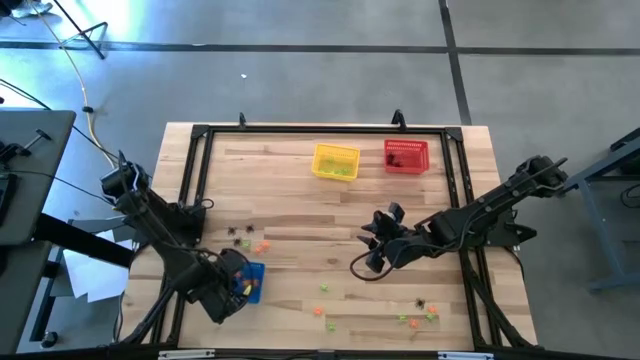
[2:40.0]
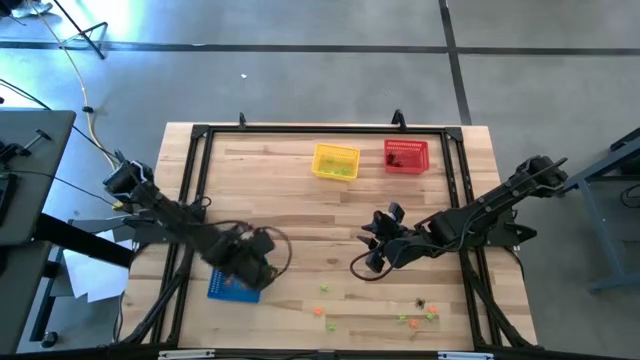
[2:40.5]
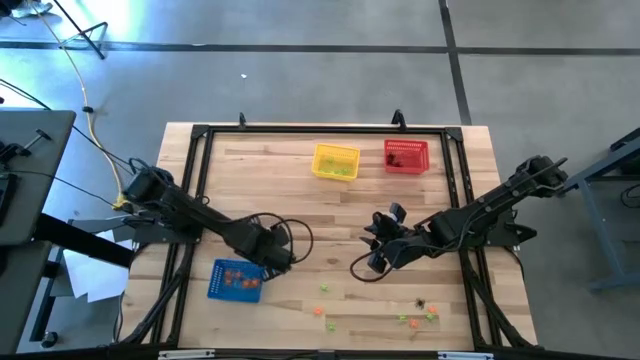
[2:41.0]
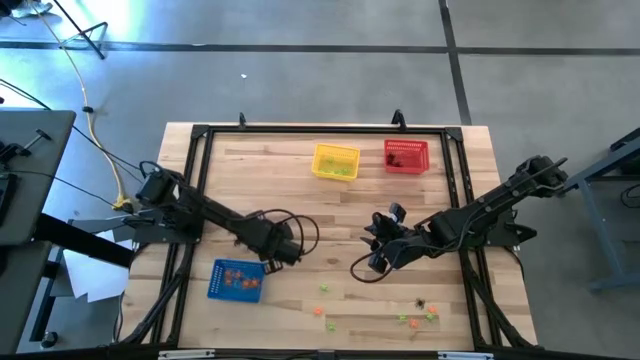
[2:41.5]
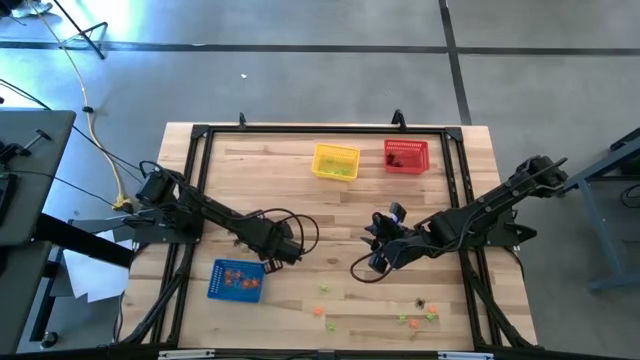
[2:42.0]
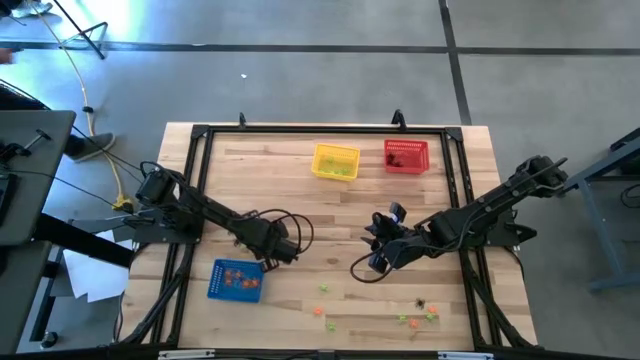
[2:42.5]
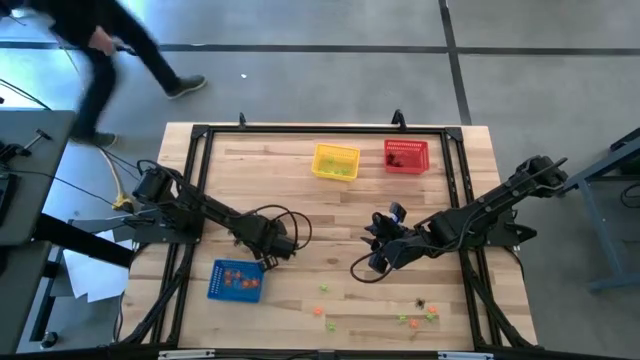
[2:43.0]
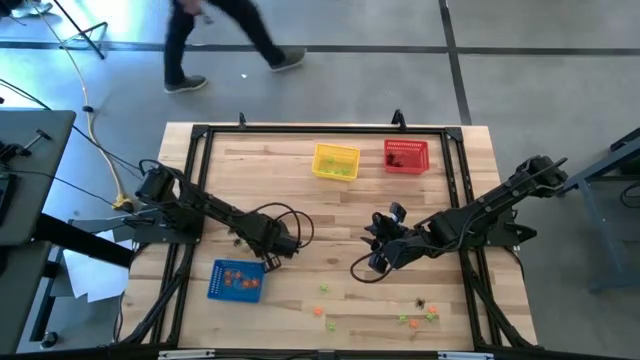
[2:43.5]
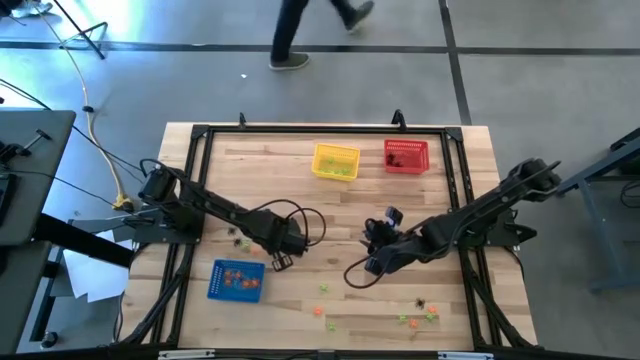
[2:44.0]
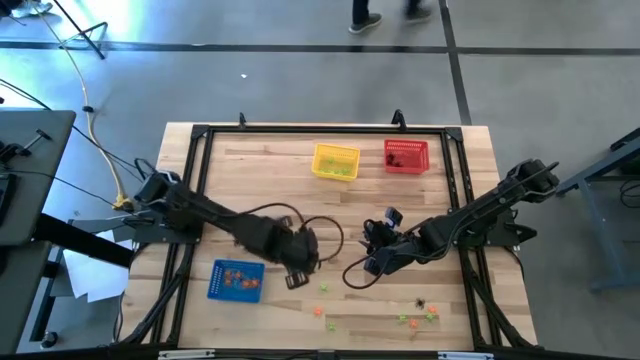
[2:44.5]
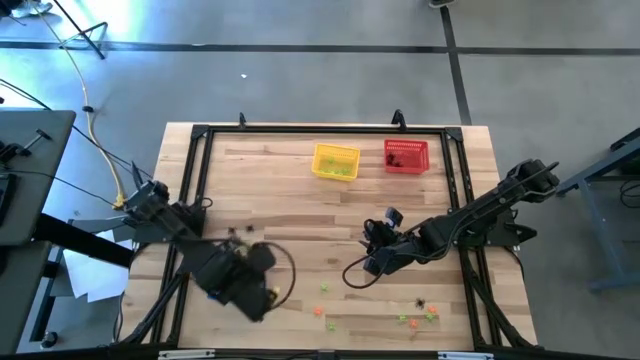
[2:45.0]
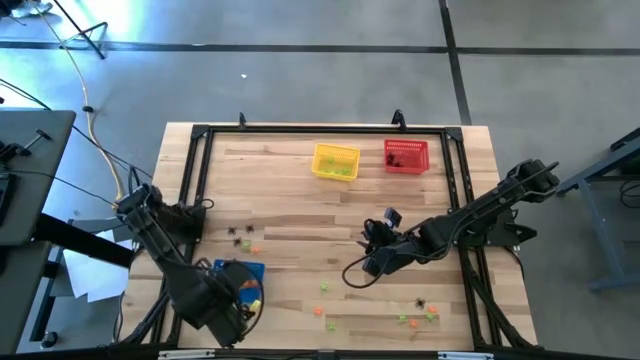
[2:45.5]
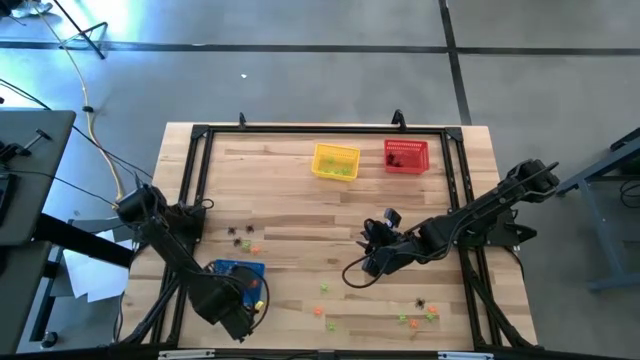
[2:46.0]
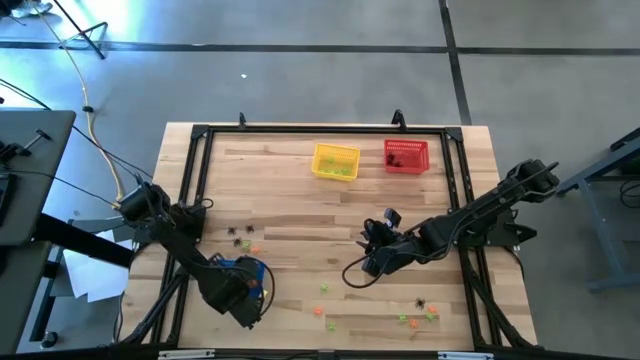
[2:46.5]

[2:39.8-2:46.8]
Task: Sort Halloween decoration
Put the orange spider toy into the blue bin

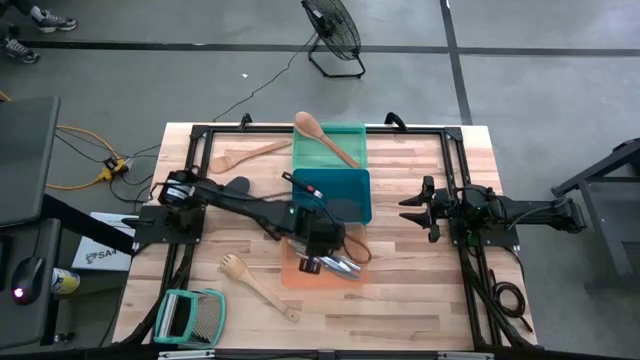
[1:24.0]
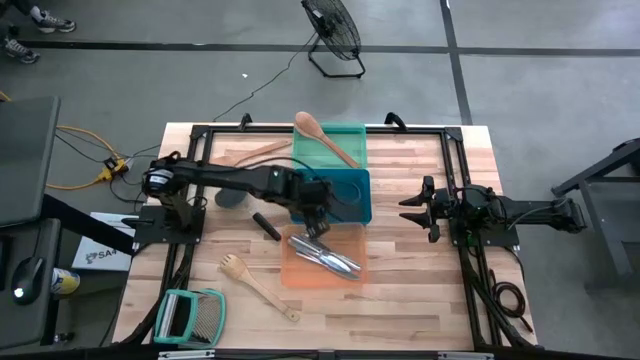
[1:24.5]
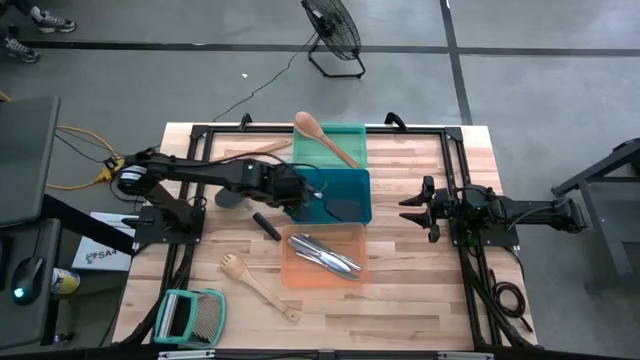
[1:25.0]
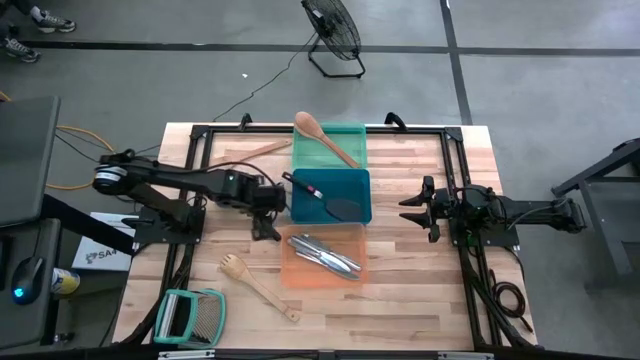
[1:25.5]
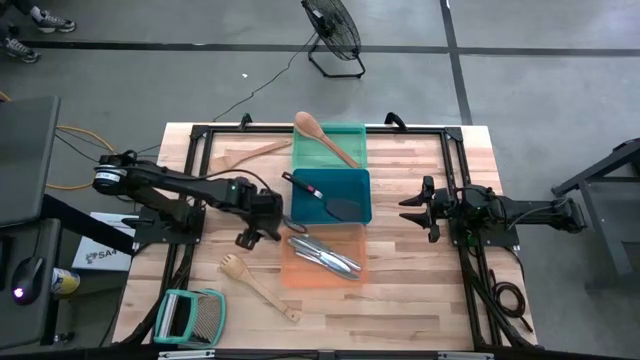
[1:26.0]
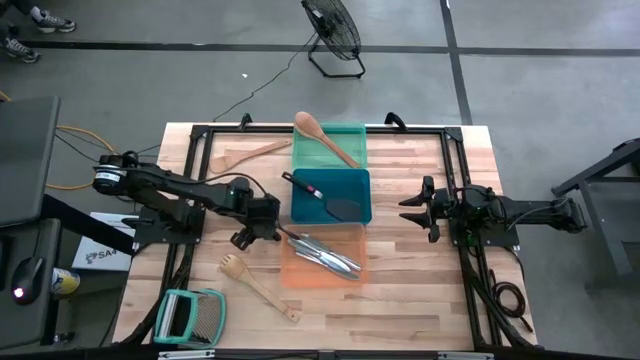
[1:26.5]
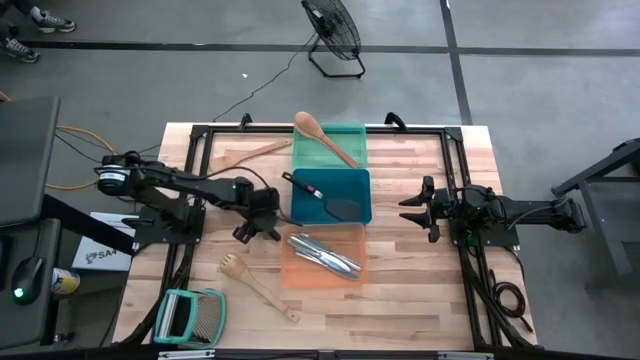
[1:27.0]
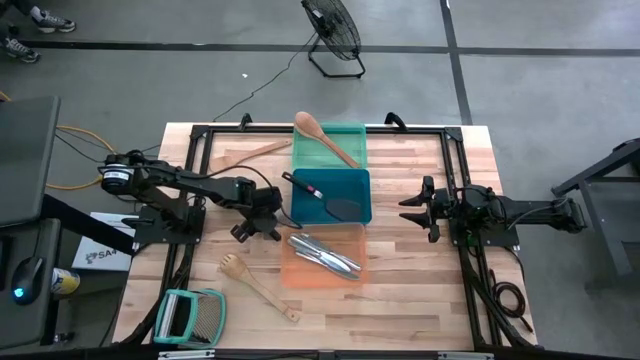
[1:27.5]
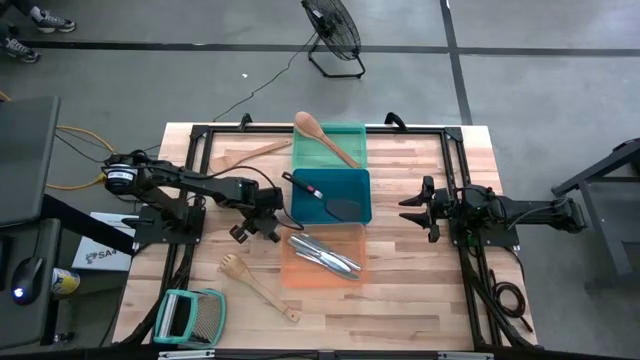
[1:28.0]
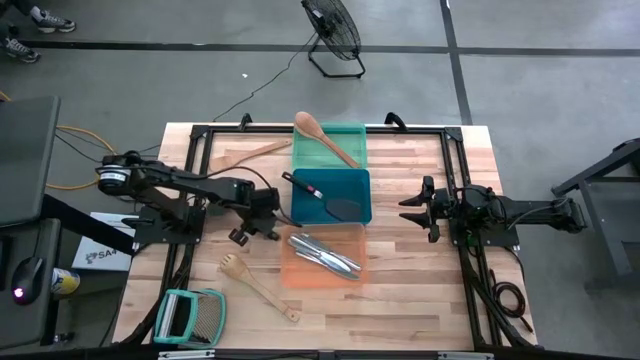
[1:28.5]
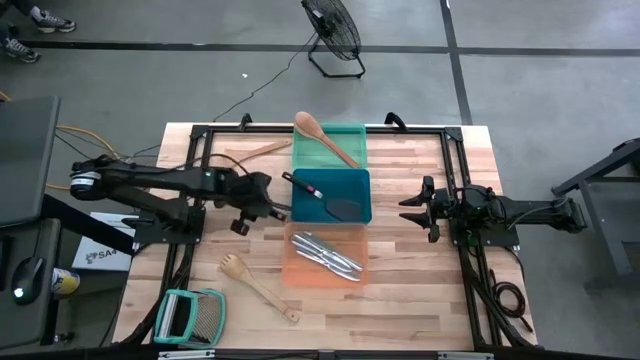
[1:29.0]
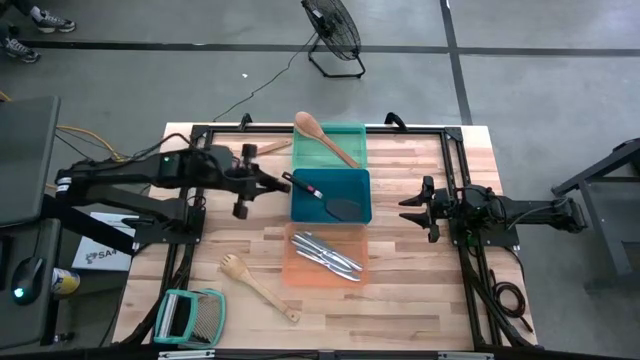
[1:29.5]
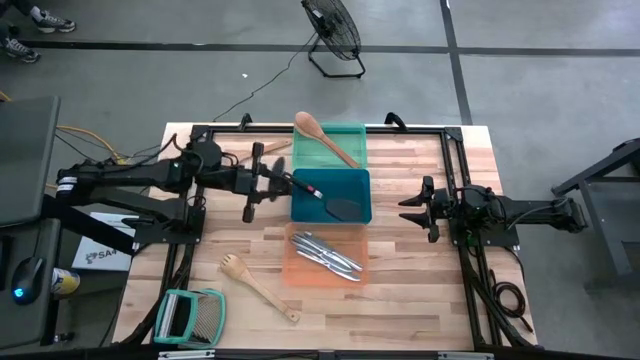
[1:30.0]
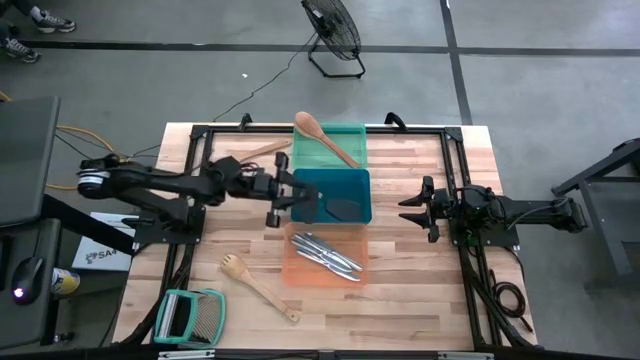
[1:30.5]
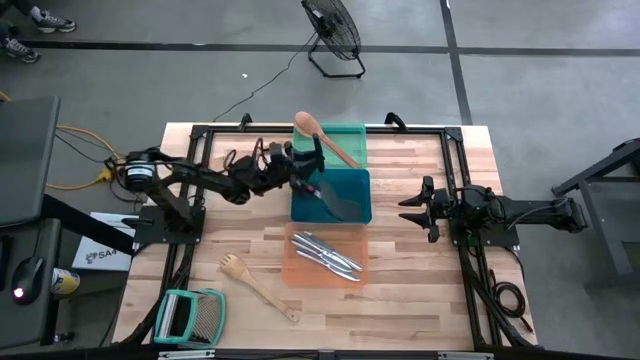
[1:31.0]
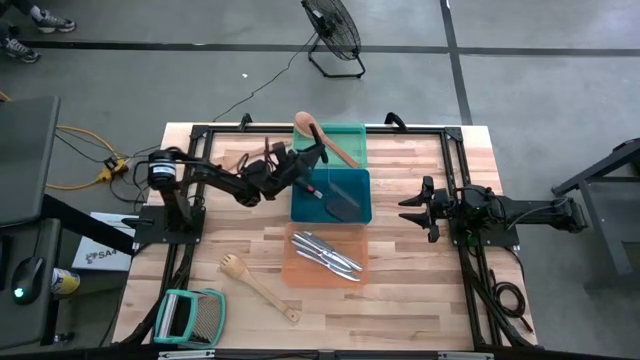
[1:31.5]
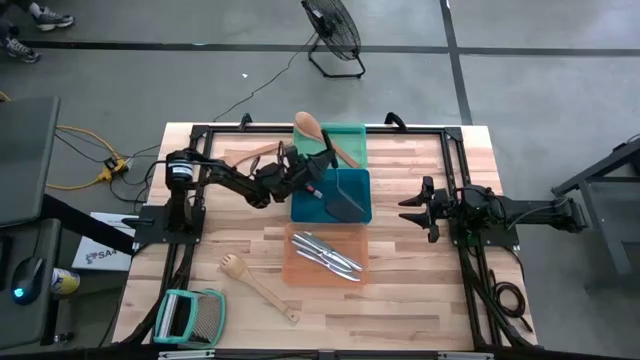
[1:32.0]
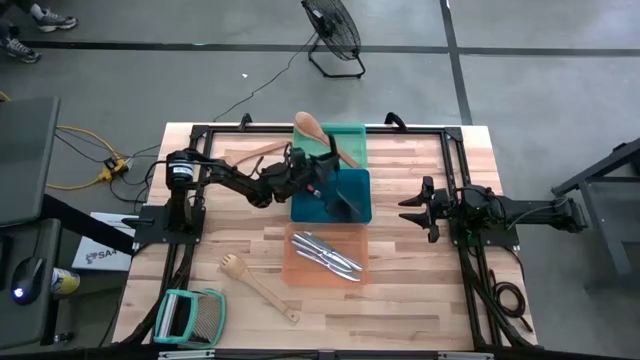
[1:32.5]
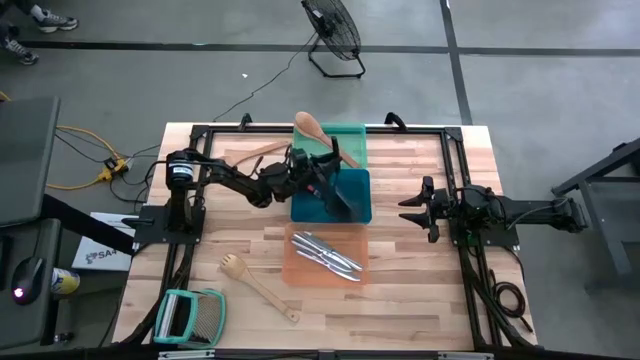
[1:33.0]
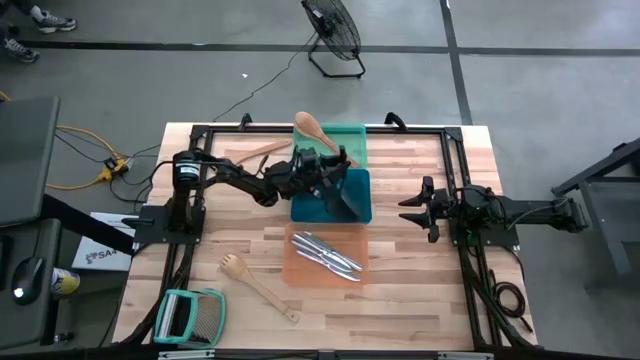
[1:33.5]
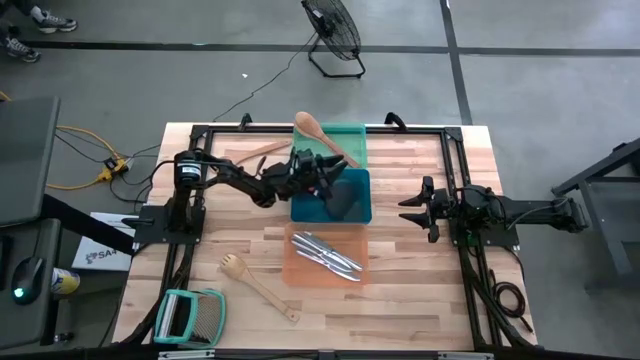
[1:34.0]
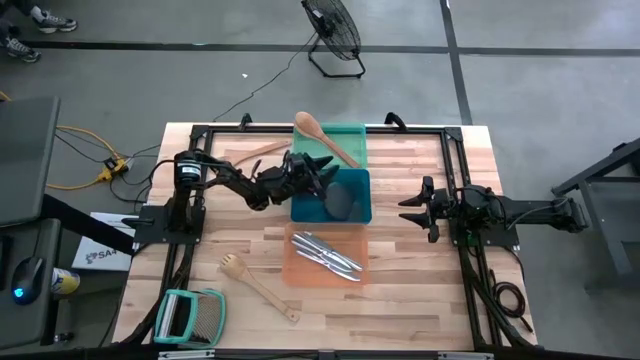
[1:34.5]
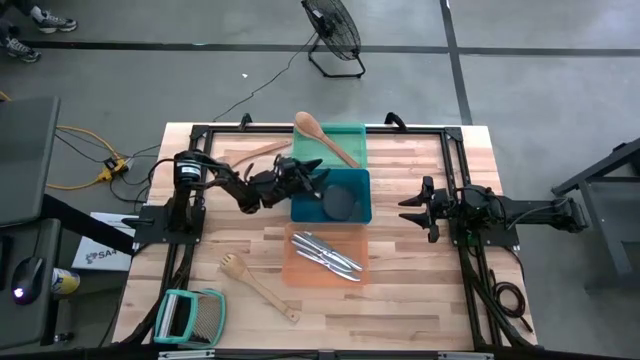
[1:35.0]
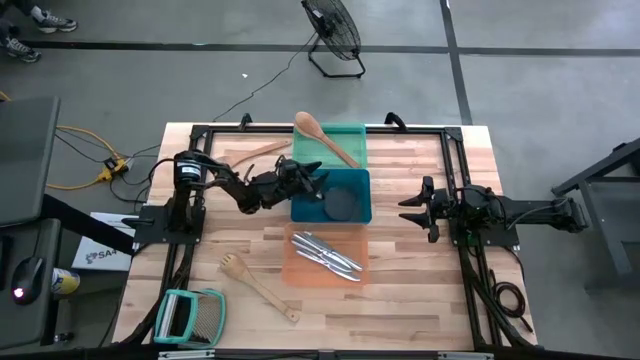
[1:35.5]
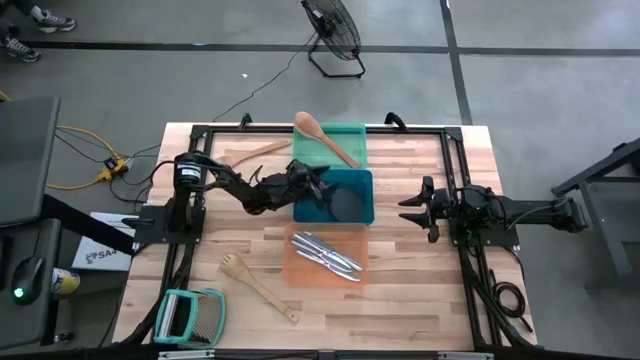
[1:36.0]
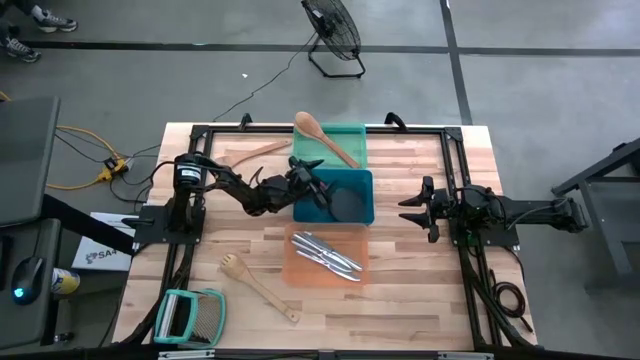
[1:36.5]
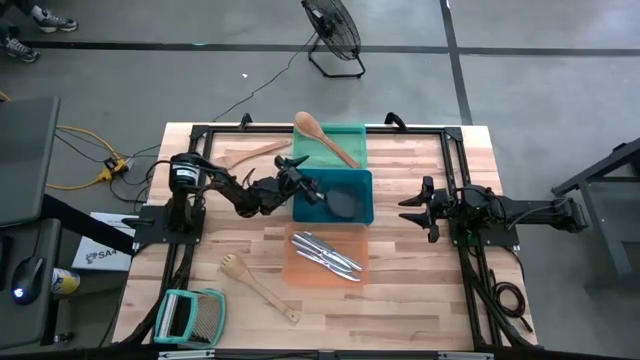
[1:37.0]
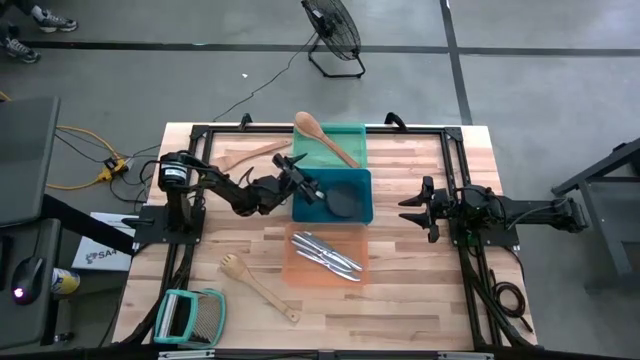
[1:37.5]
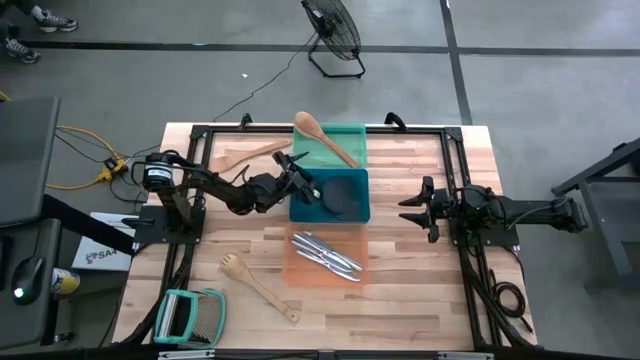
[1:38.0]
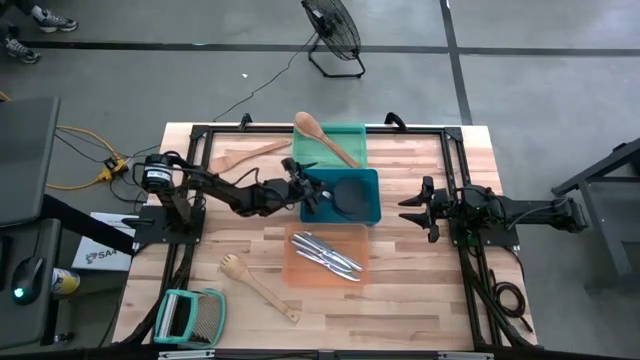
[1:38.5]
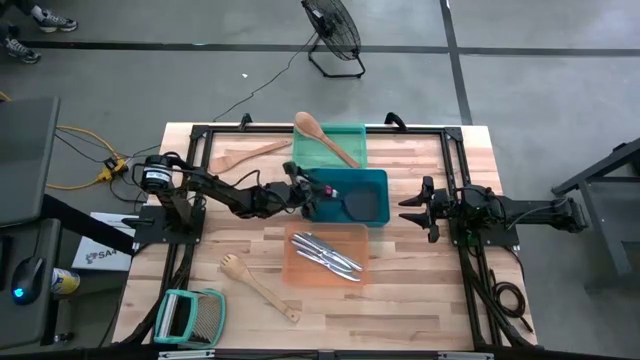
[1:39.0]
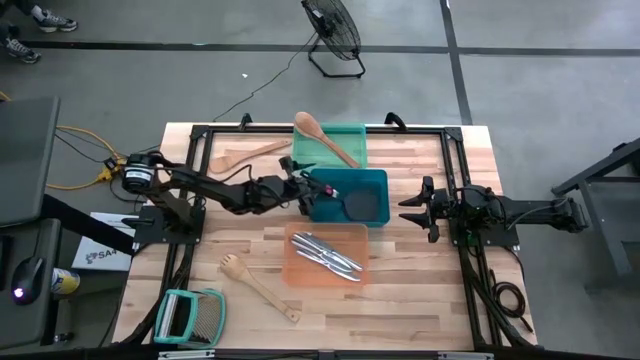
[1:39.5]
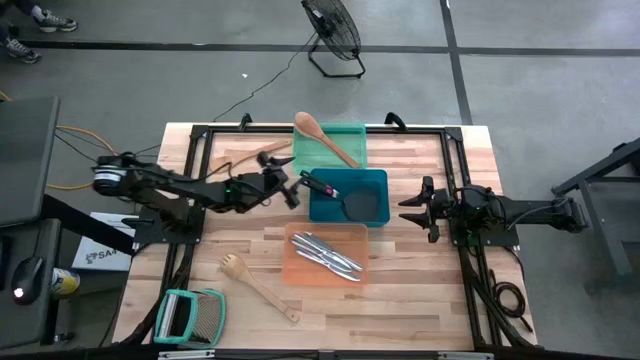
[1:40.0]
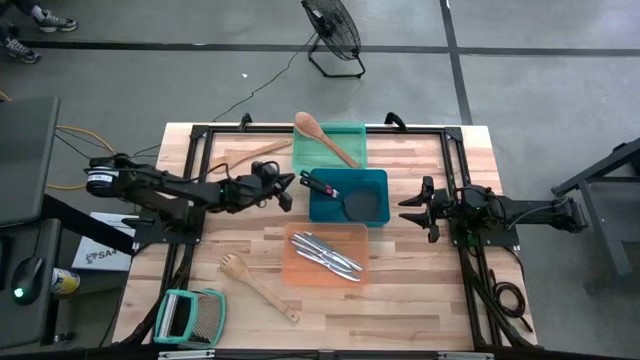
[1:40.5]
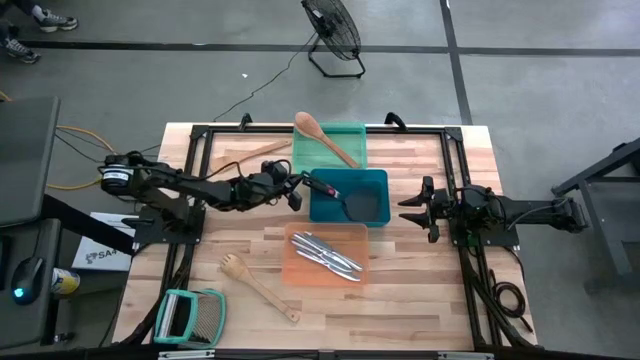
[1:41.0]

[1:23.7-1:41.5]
Task: Pick & Place Kitchen Items
Put the black spatula into the blue bin
